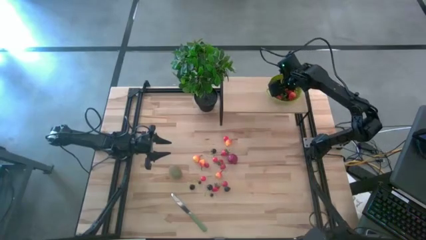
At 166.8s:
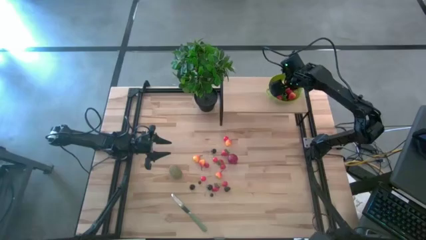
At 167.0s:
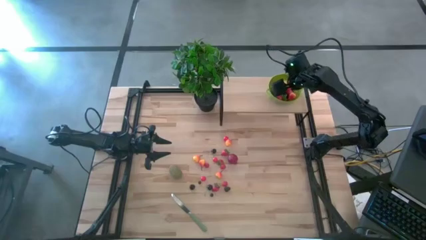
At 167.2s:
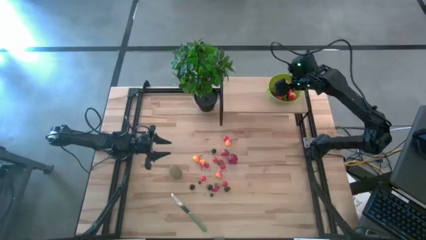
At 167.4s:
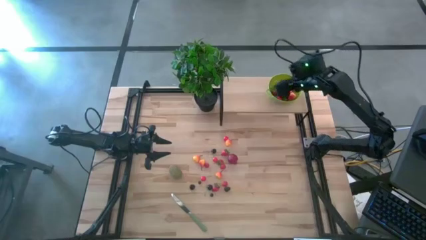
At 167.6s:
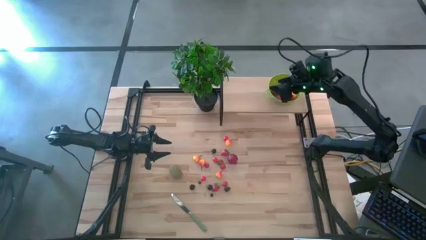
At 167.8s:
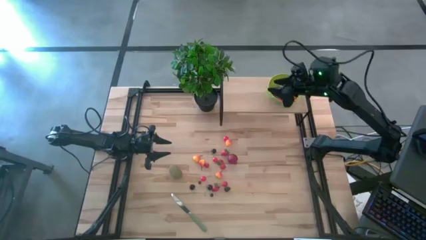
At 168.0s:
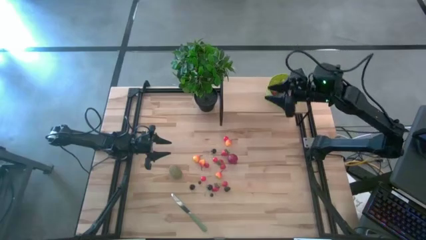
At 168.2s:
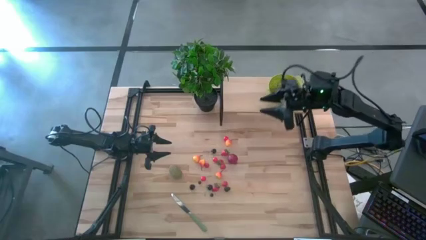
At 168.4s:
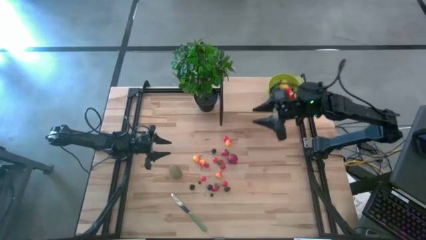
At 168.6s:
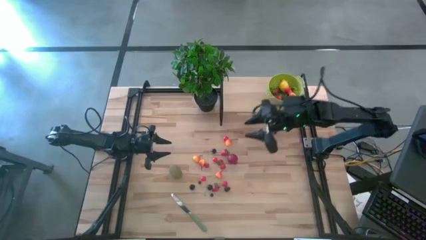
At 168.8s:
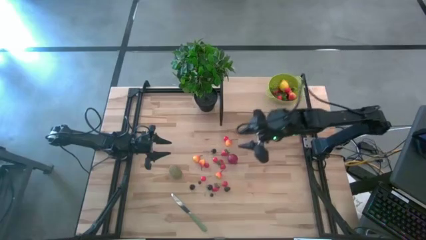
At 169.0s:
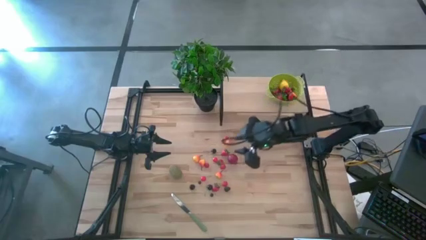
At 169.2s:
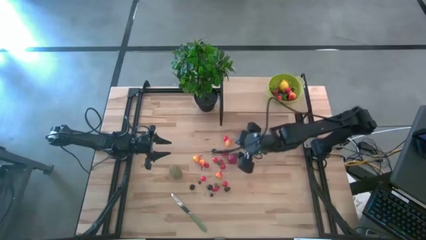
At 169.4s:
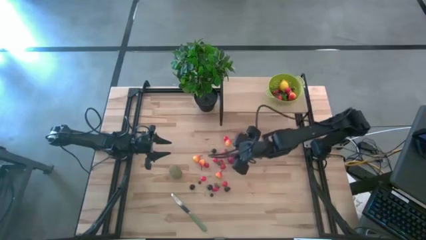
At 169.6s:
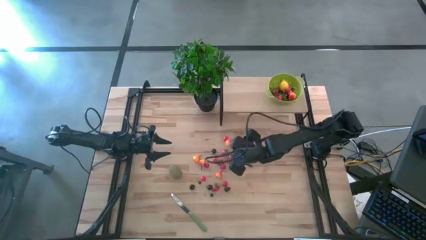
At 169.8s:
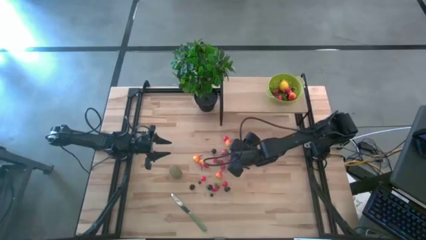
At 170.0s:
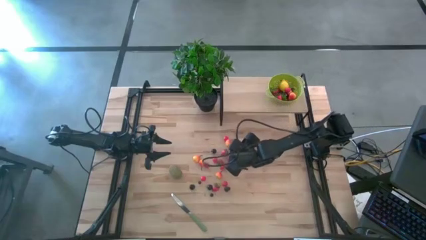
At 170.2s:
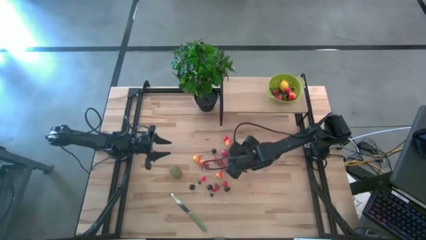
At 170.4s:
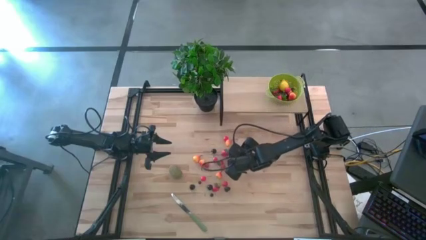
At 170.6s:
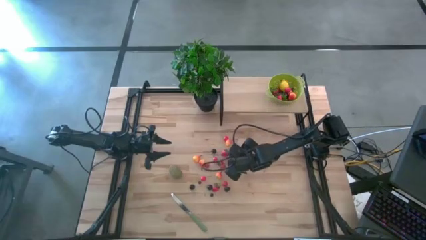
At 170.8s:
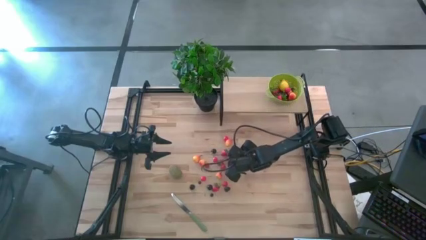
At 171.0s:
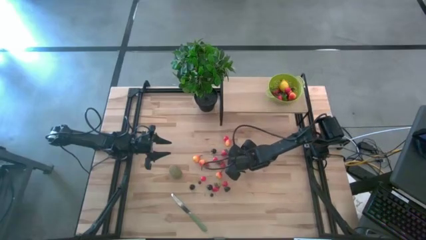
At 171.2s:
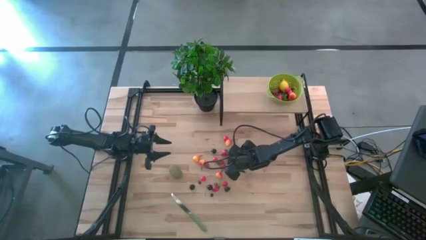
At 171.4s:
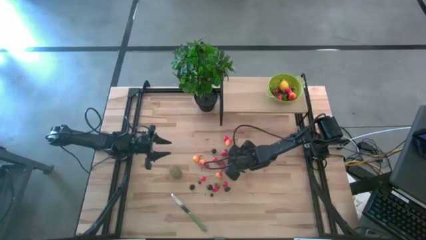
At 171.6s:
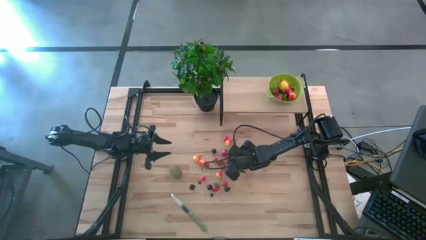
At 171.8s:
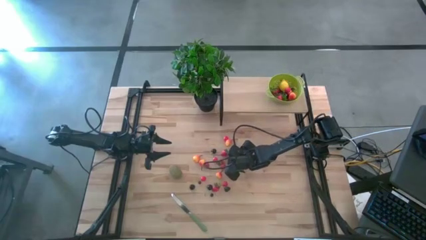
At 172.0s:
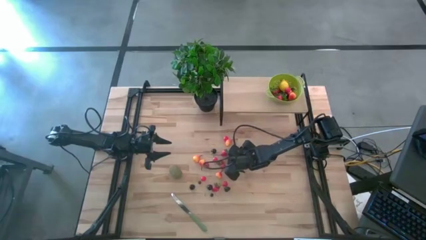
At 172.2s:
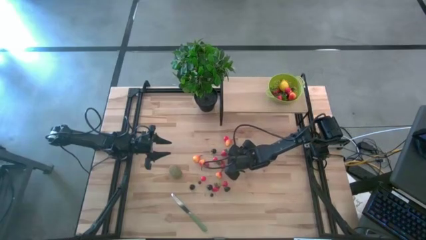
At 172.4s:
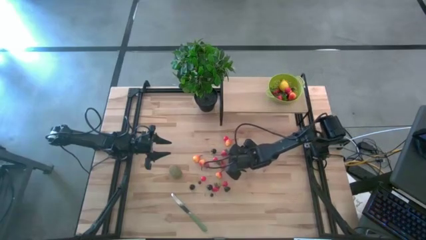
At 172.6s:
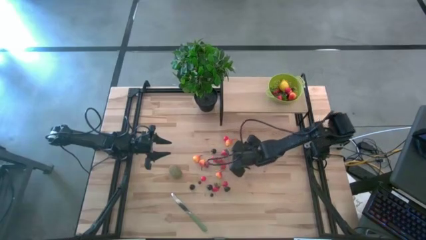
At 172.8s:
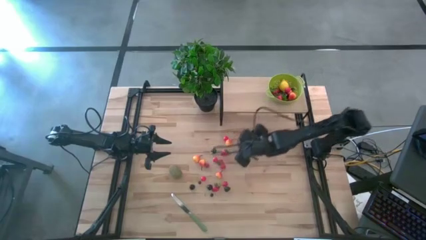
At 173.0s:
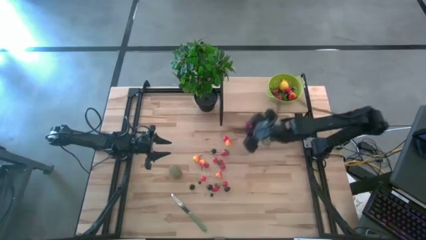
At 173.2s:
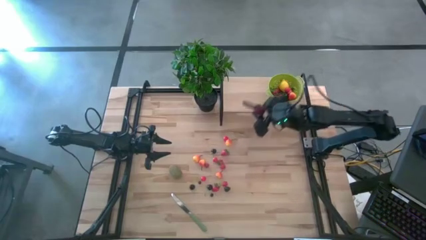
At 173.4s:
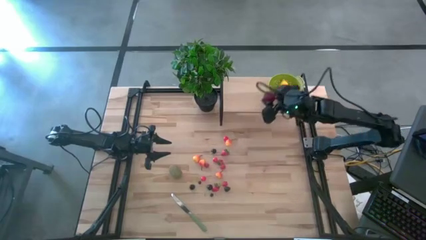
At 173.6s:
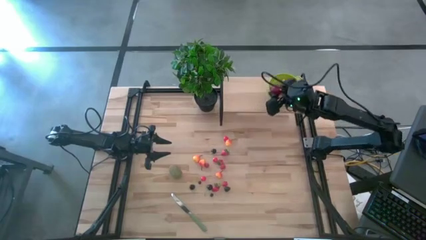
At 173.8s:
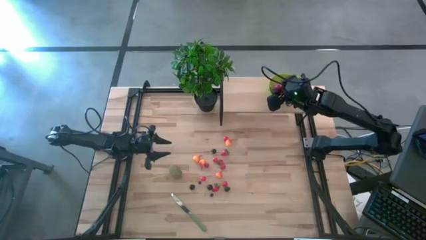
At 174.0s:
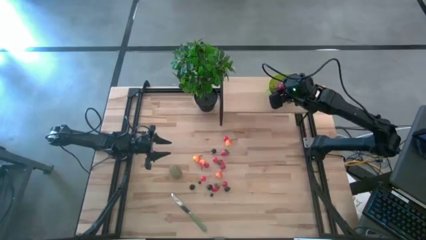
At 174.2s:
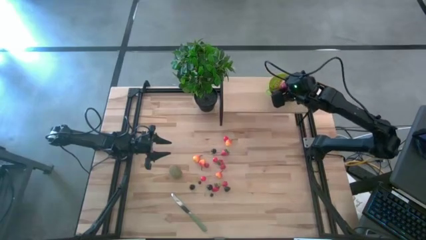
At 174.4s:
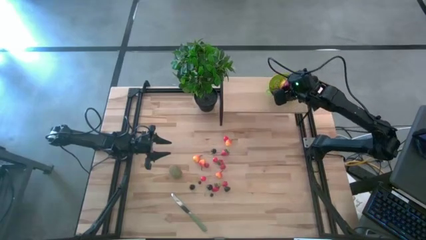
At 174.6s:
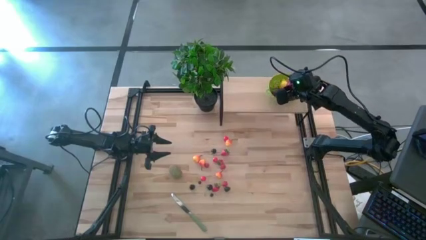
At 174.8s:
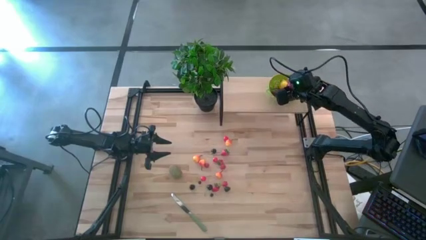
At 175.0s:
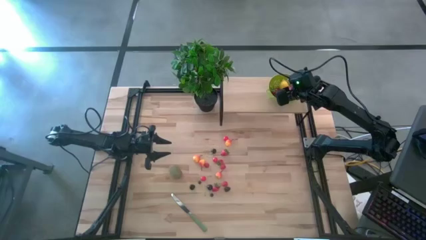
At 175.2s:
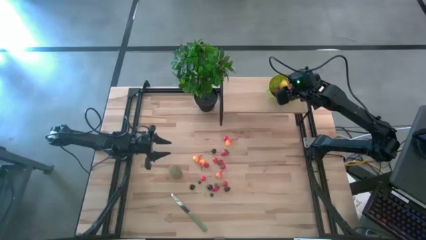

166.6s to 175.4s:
Task: Pick & Place Fruit
Put the pomegranate into the green strainer bowl on the shelf

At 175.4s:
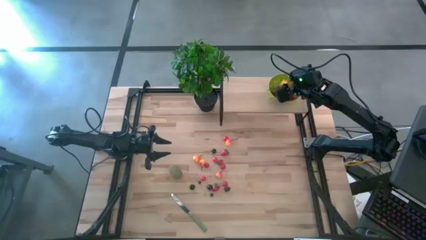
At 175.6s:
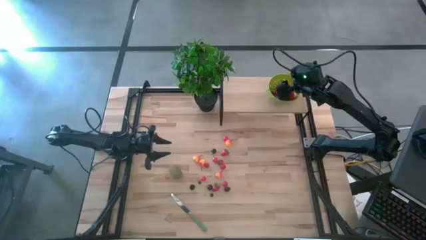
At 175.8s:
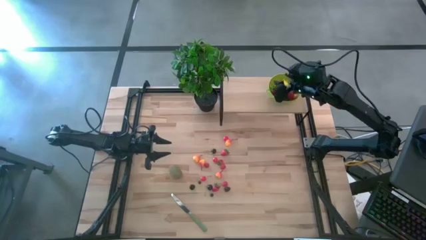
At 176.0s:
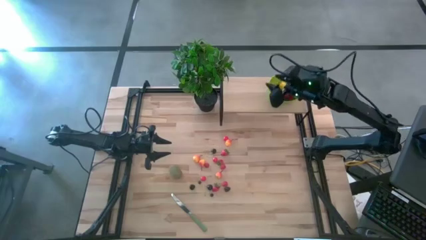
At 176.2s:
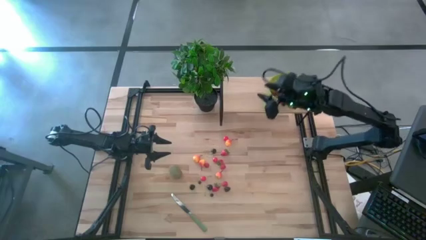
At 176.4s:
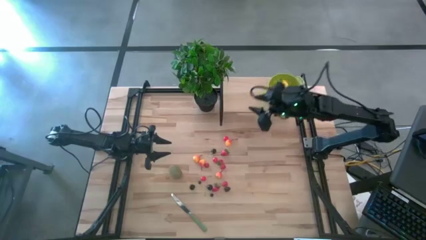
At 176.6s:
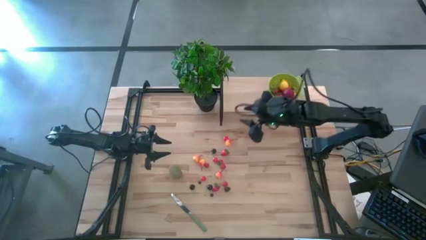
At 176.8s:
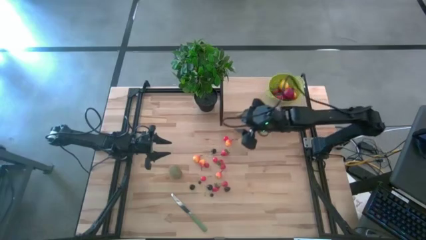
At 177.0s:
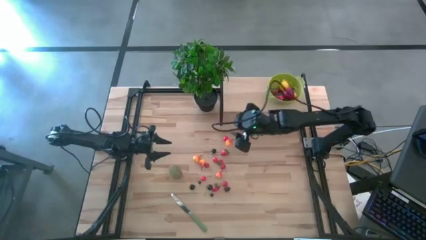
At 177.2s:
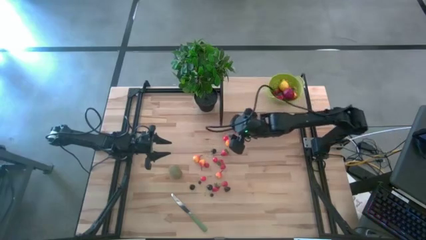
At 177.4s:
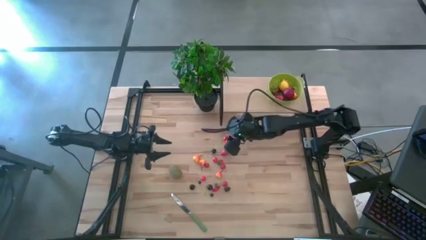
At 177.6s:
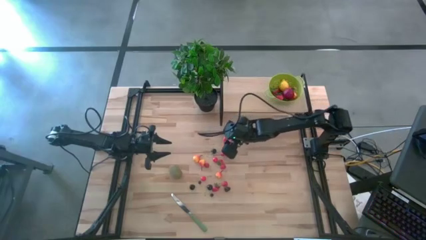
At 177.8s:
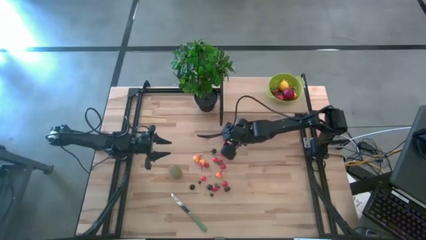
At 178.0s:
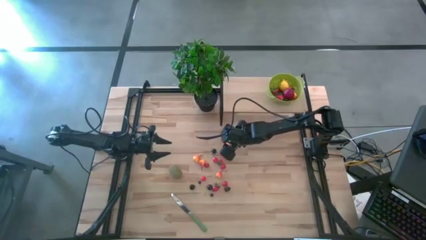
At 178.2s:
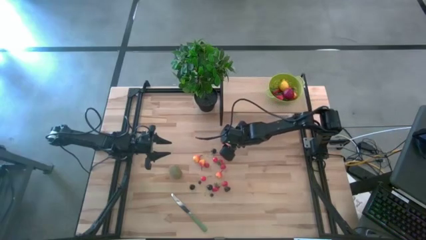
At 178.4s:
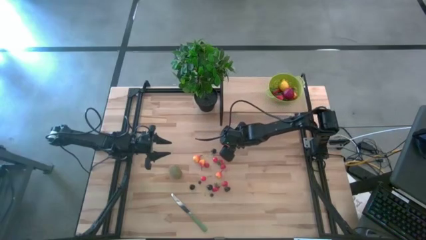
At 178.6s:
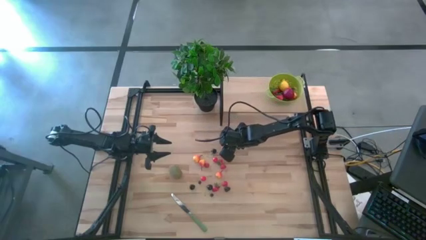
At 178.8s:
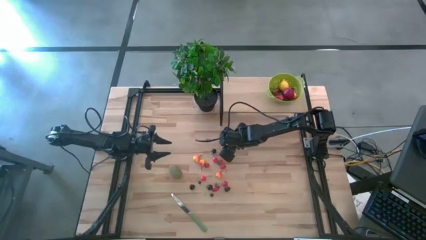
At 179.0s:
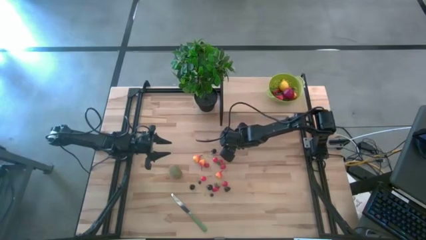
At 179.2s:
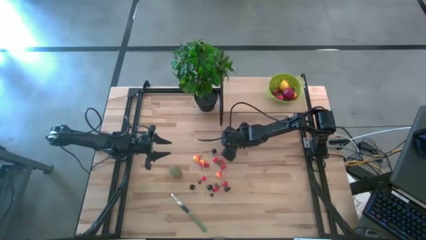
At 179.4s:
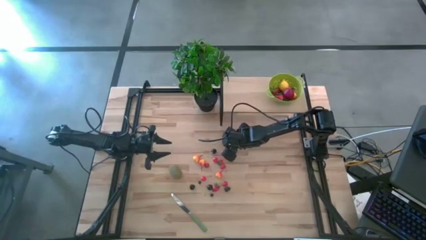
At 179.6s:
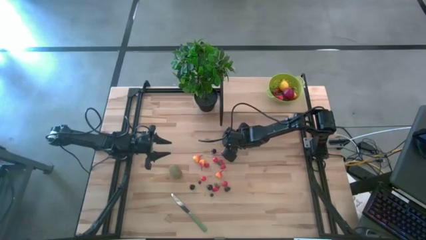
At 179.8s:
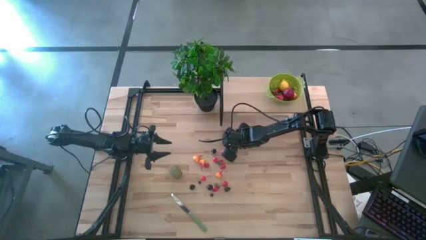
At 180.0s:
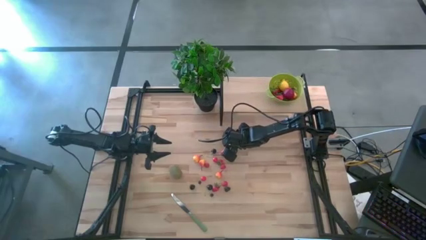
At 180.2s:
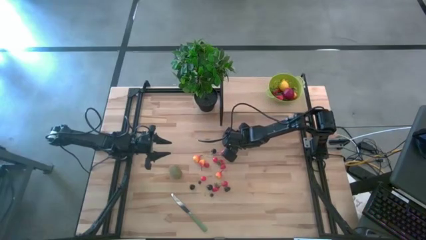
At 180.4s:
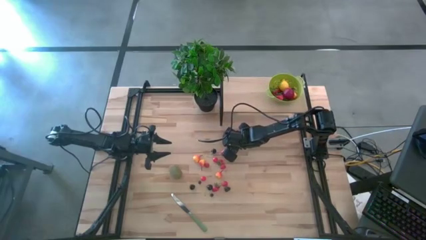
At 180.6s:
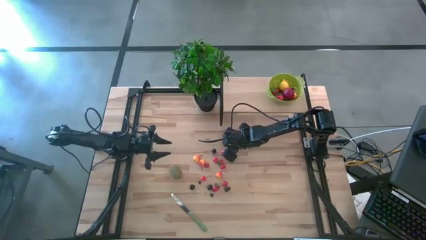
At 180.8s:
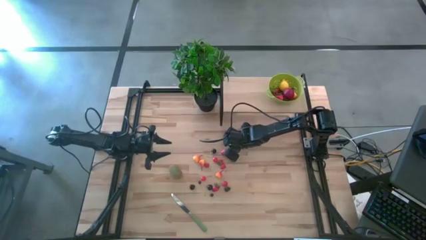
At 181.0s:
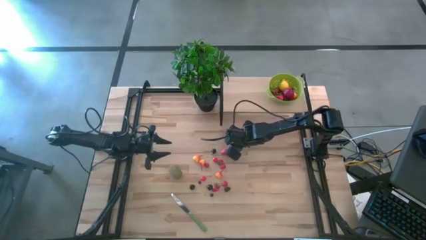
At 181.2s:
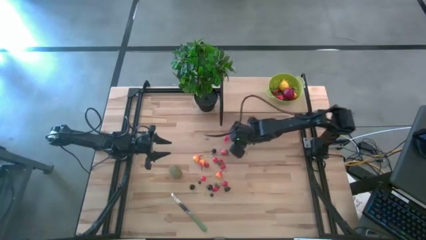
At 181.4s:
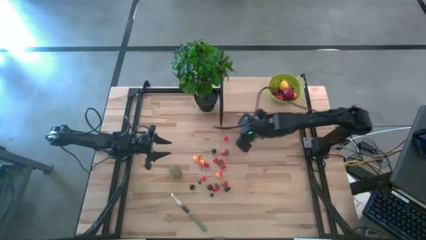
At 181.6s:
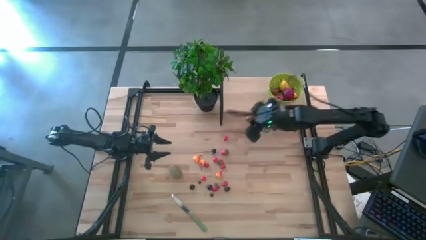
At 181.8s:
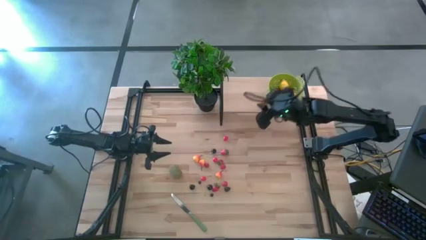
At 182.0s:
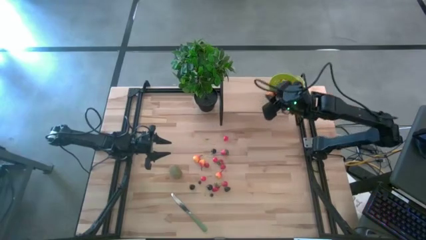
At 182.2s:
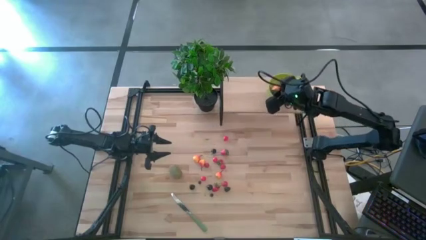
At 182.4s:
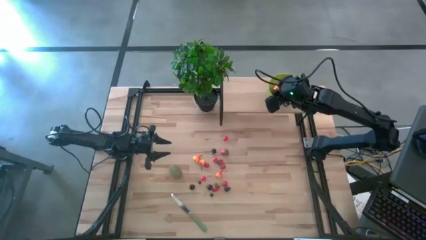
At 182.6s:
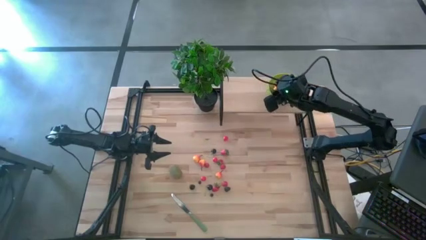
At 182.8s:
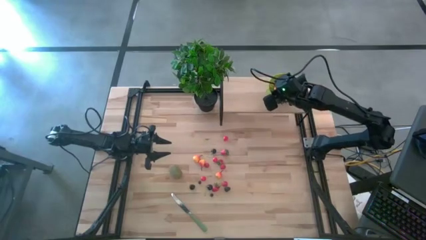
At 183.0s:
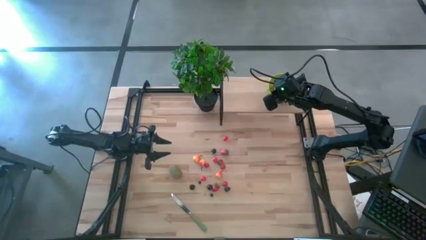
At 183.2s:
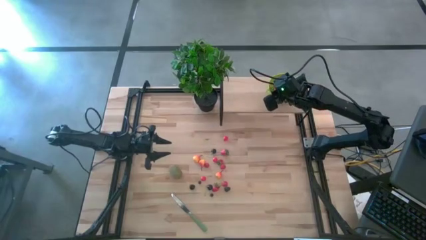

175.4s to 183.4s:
Put the pear into the green strainer bowl on the shelf
